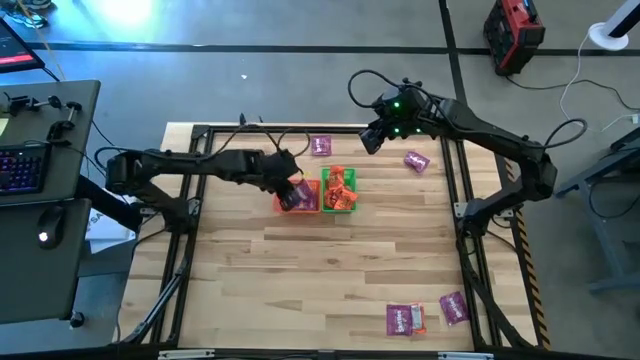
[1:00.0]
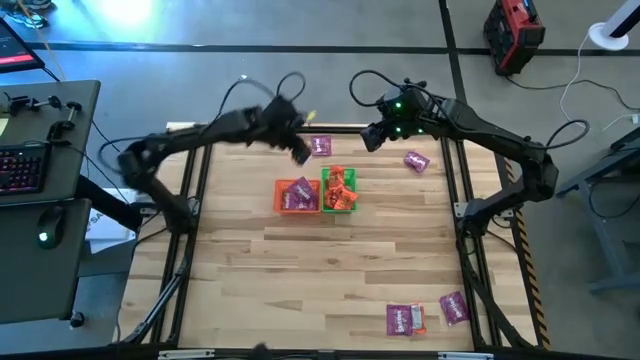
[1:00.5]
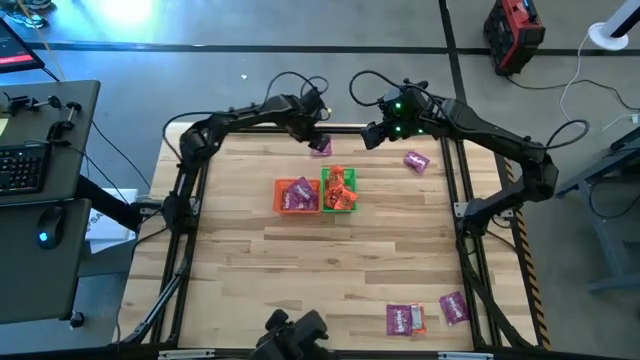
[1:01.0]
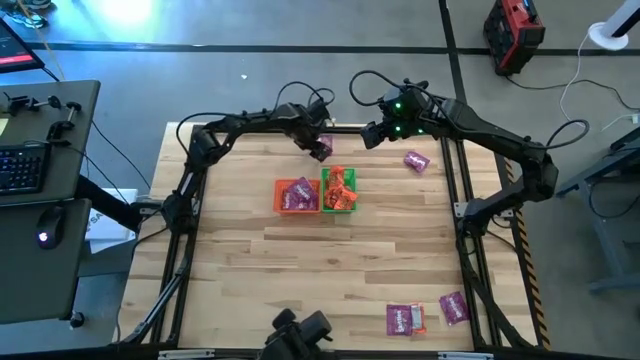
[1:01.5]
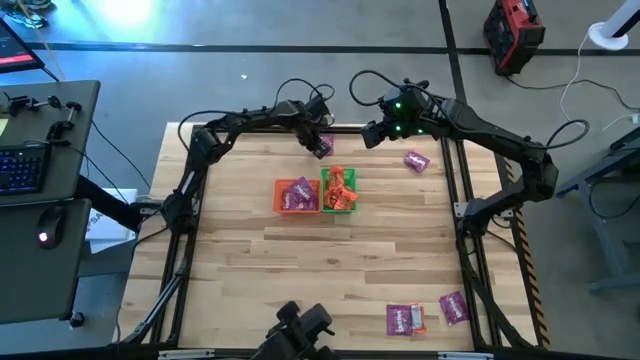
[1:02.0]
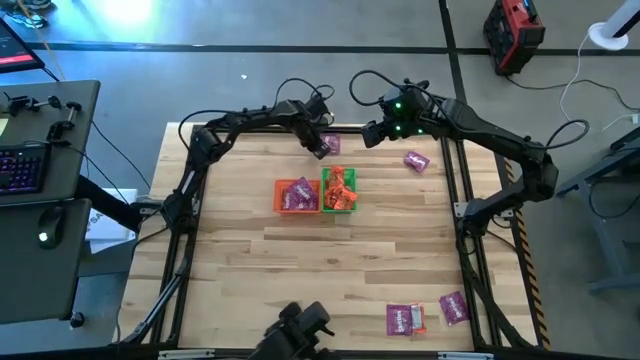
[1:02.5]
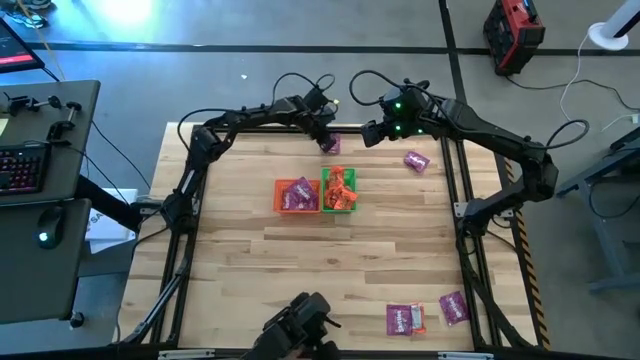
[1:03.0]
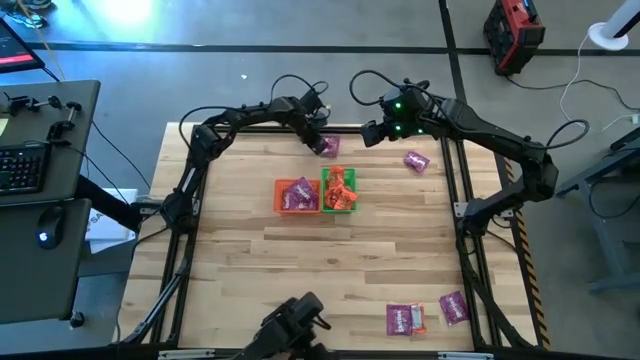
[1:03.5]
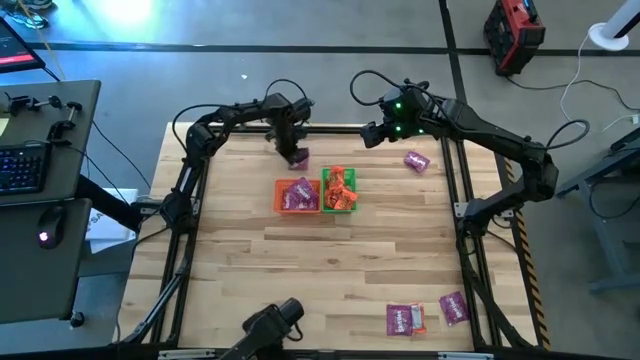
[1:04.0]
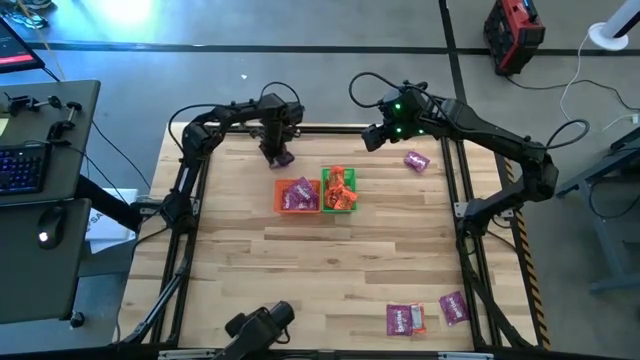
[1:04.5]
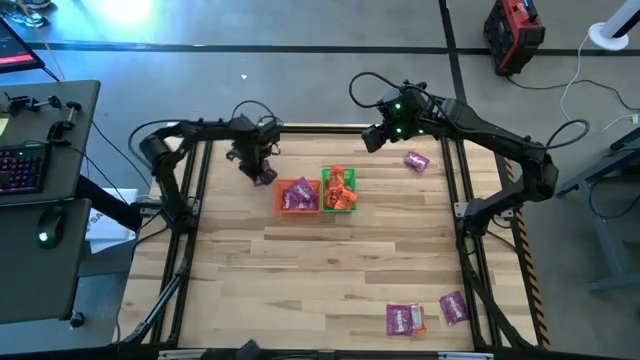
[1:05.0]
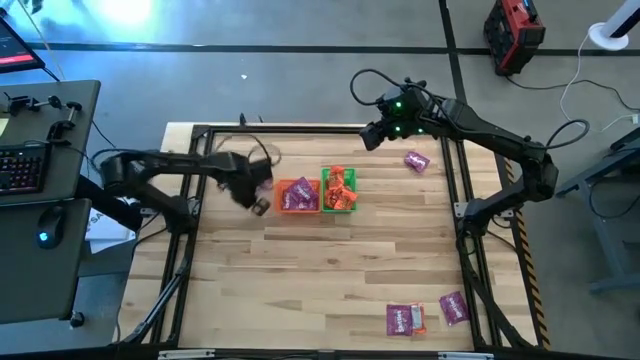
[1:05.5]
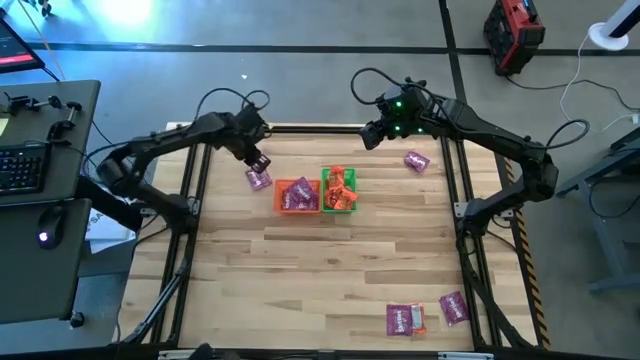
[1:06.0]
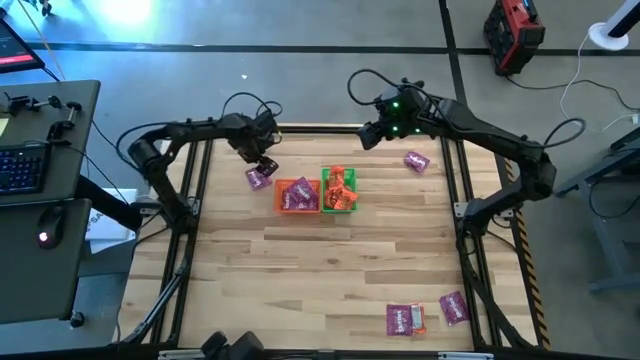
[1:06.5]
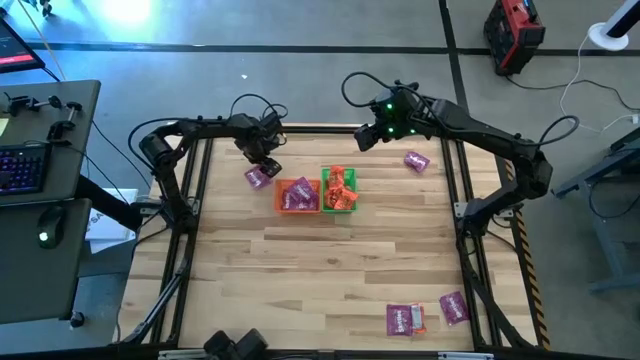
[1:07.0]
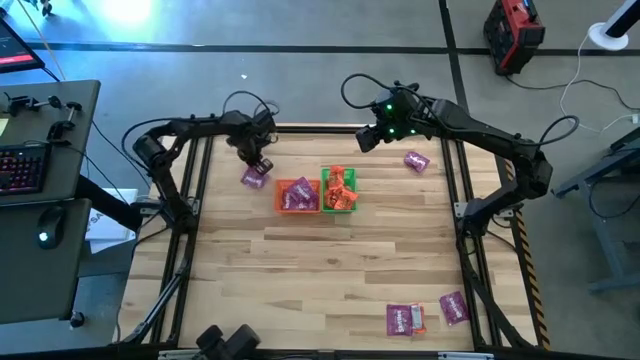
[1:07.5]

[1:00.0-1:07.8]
Task: Sort candy by brand, put in halloween buckets
Put the violet candy into the orange bin

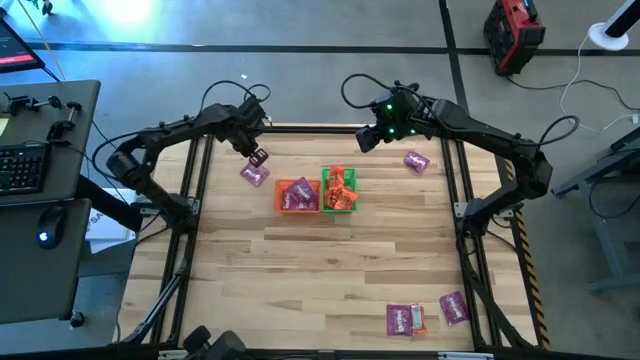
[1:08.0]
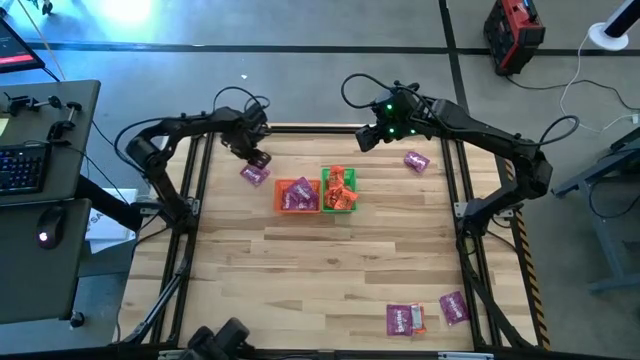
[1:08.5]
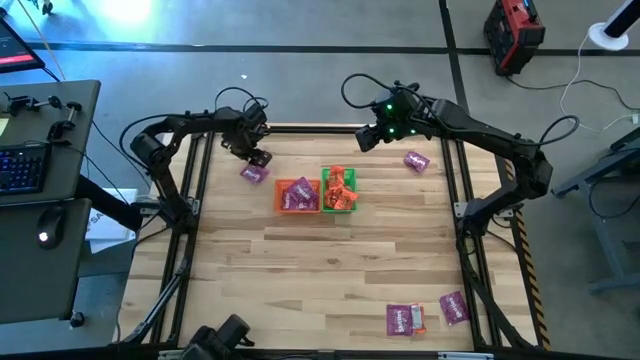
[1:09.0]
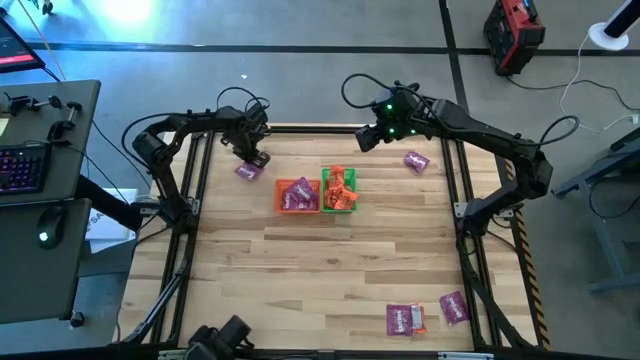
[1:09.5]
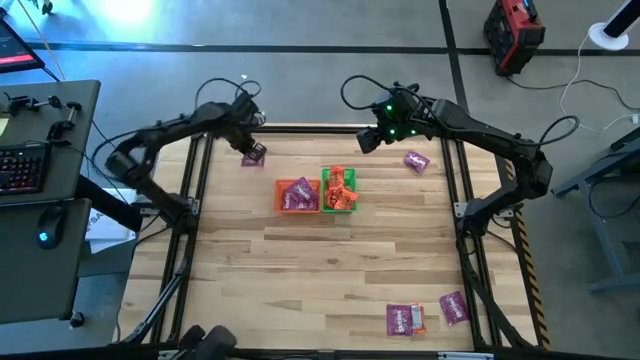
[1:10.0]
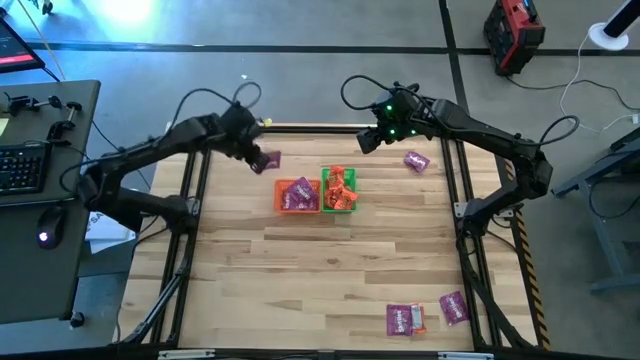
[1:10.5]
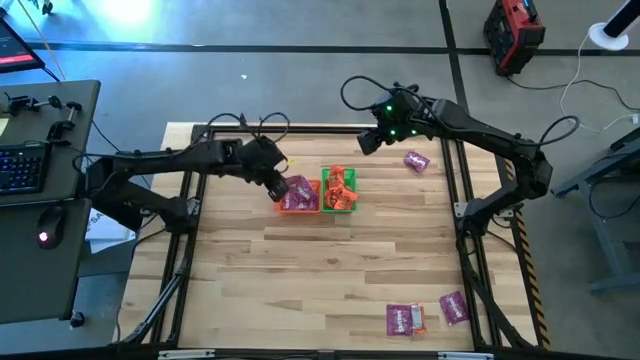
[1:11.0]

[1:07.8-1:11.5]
Put the violet candy into the orange bin

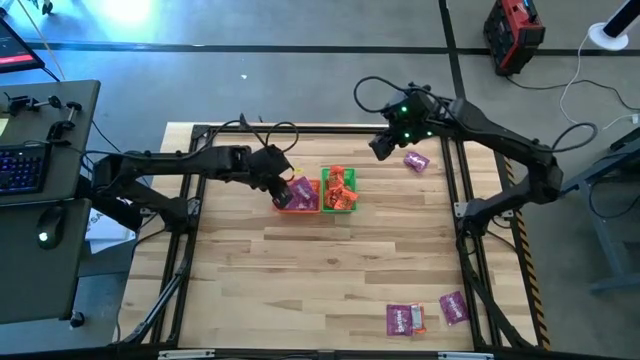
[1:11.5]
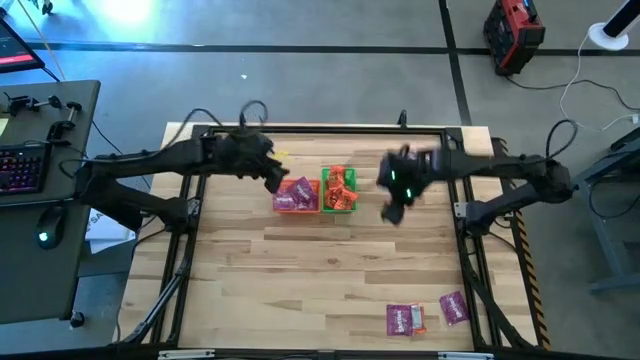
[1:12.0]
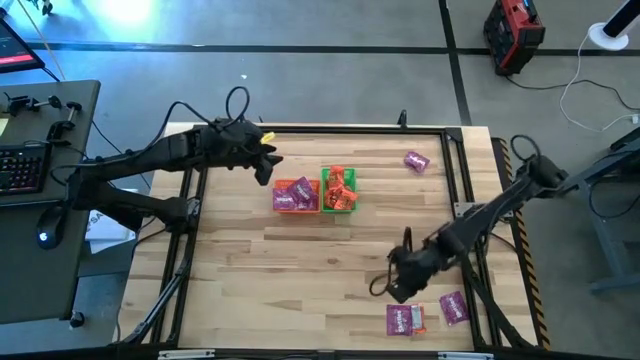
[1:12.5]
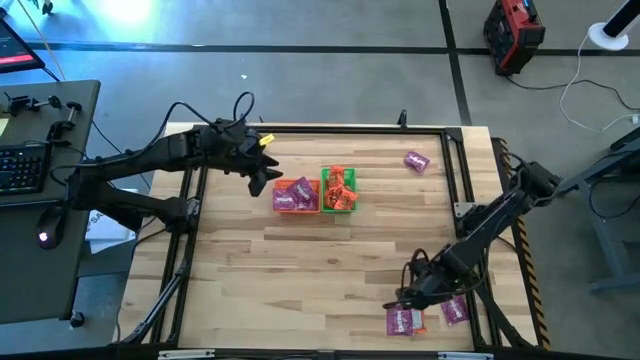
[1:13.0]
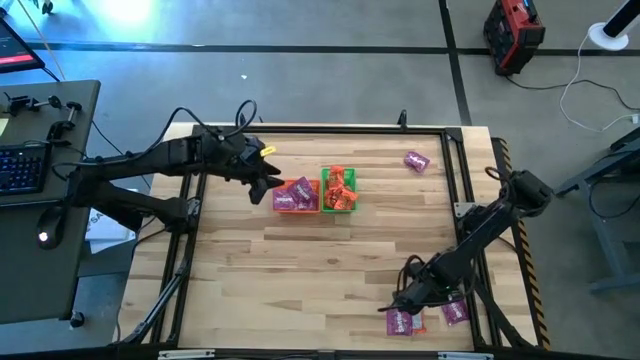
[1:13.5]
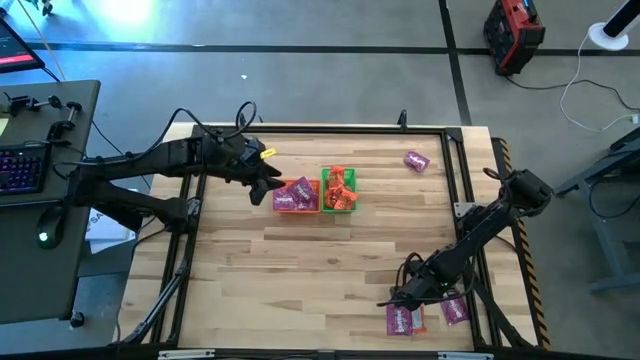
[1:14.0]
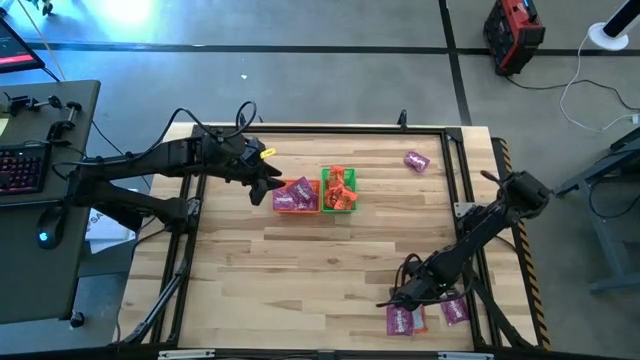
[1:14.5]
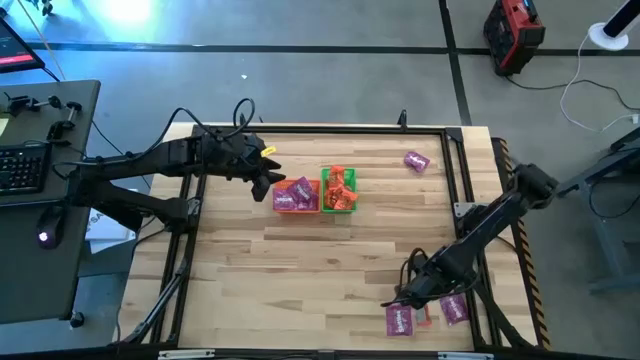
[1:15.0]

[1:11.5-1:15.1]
Put the orange chocolate into the green bin

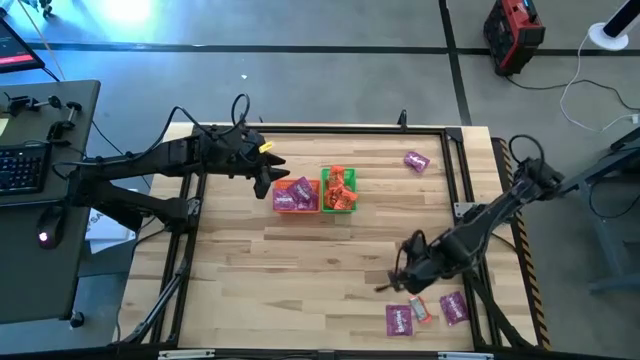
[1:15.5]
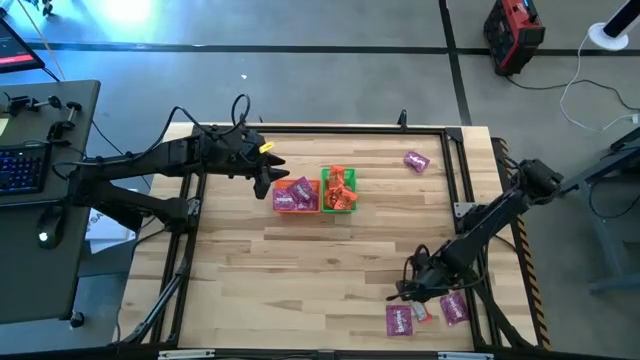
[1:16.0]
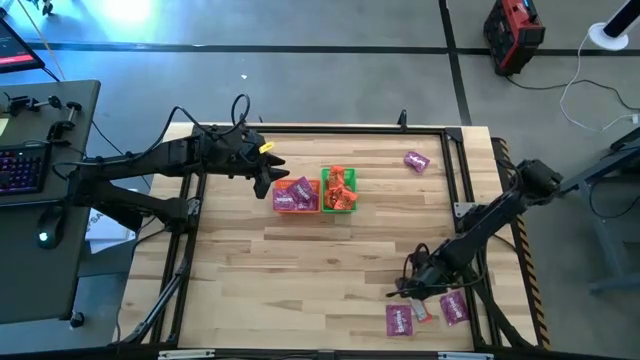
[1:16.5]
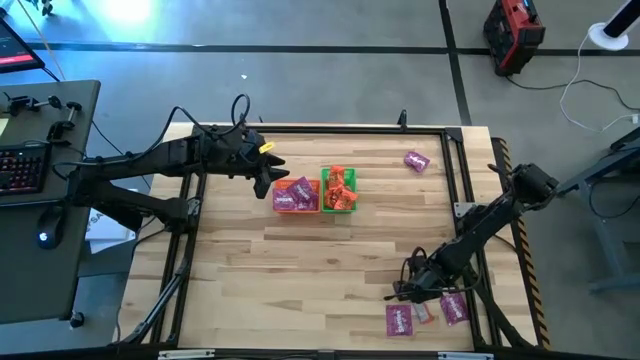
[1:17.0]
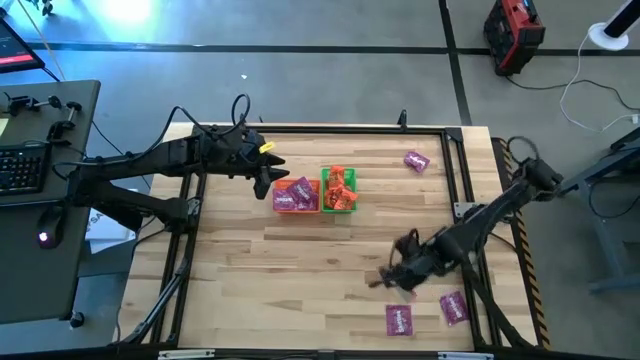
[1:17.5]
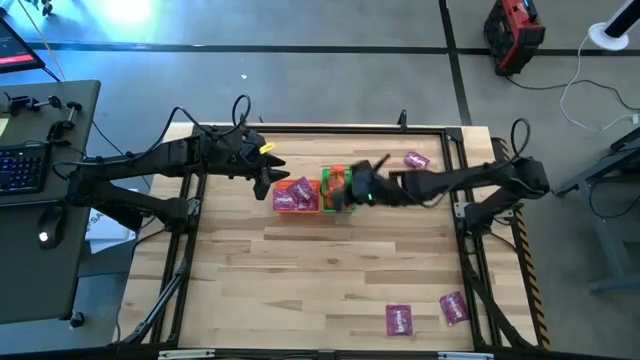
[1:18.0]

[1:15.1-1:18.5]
Put the orange chocolate into the green bin

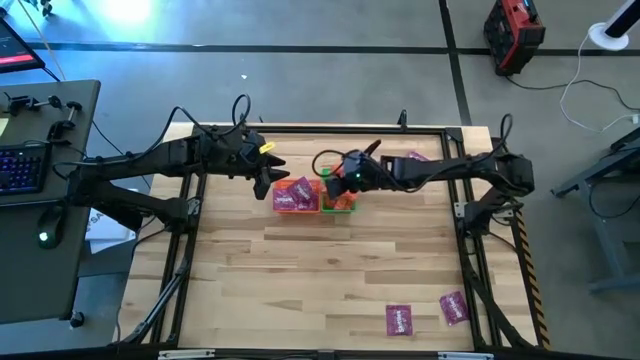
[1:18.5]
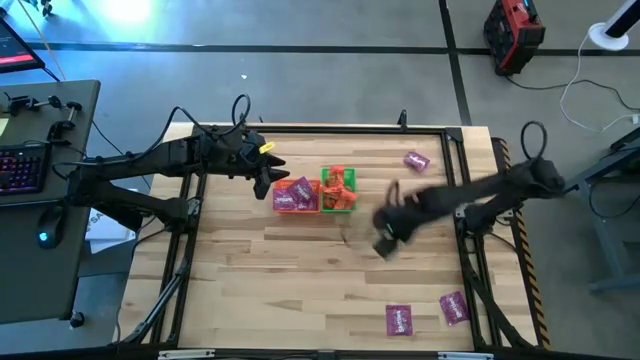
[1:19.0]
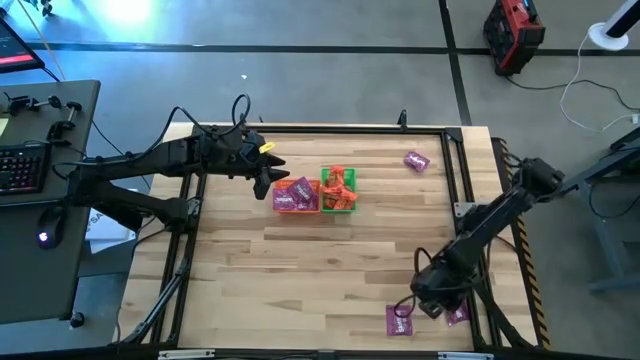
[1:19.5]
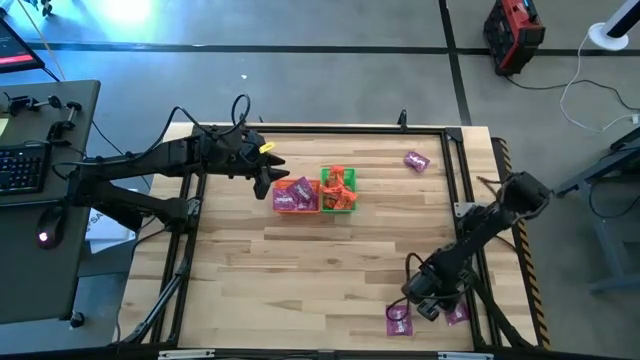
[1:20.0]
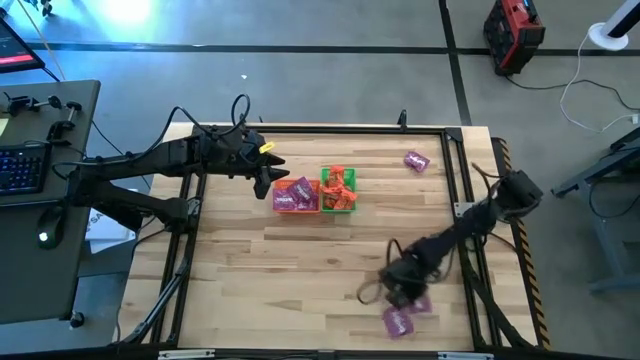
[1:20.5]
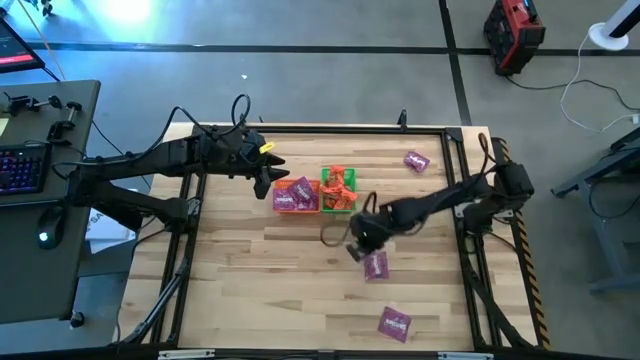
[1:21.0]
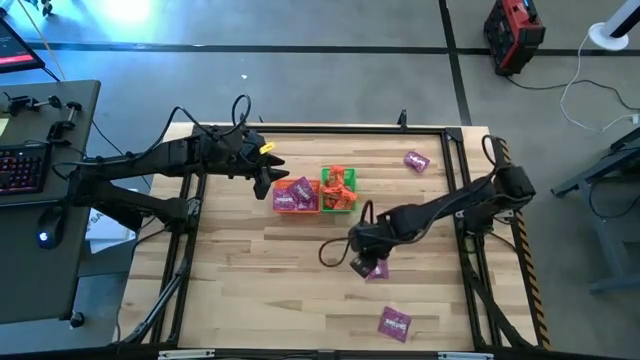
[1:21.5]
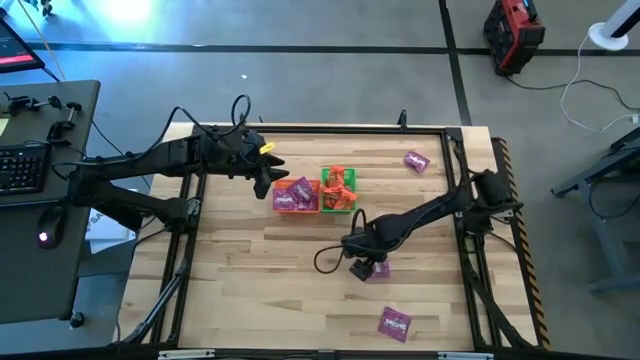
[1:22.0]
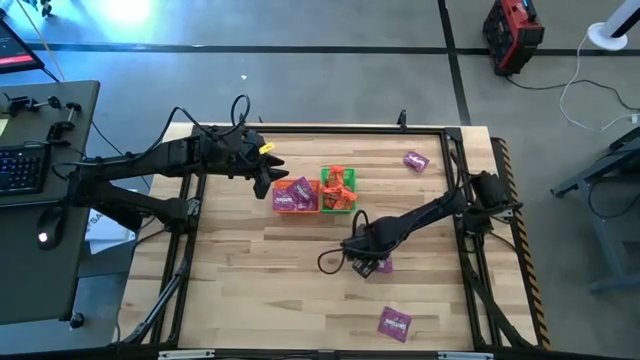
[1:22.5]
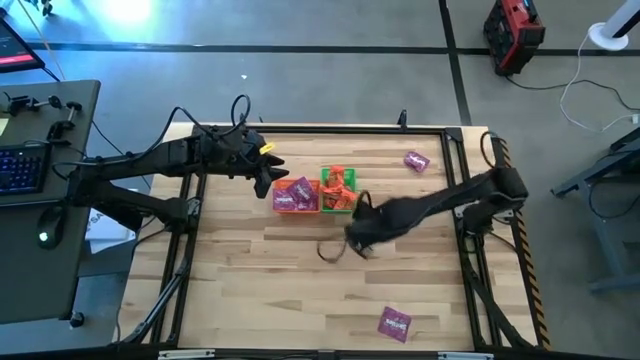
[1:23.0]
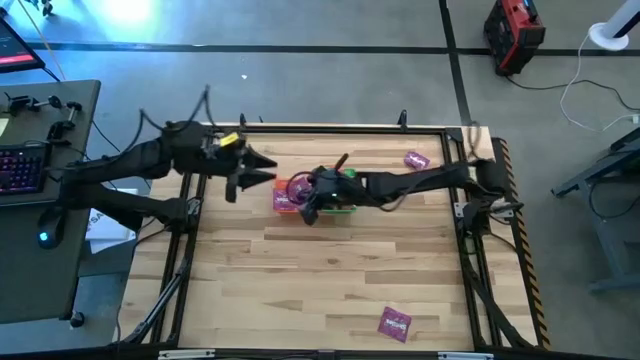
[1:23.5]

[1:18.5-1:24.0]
Put the violet candy into the orange bin
